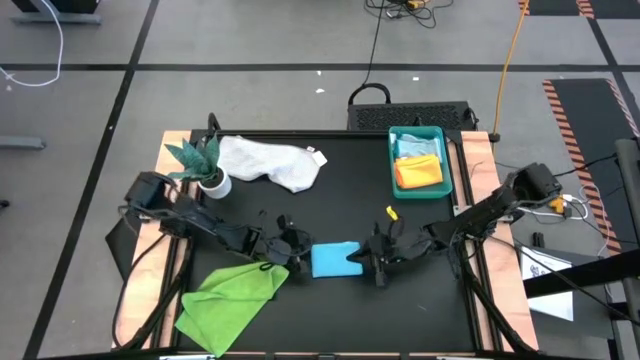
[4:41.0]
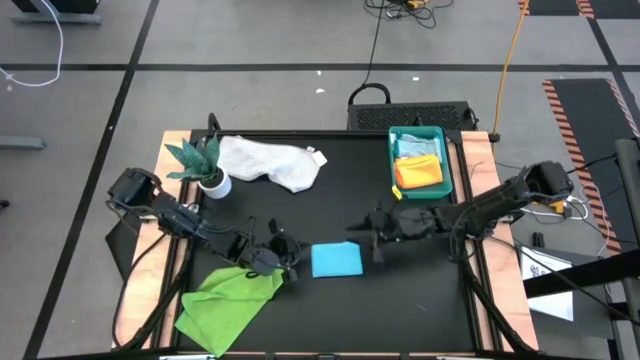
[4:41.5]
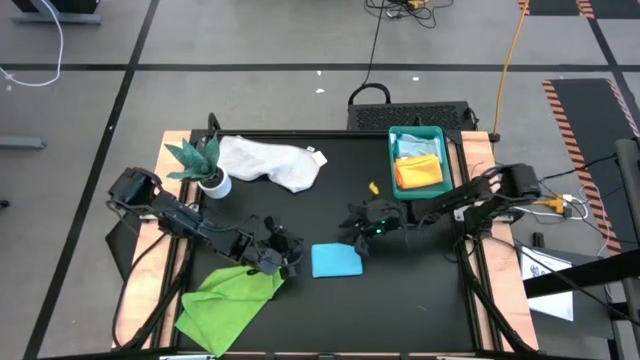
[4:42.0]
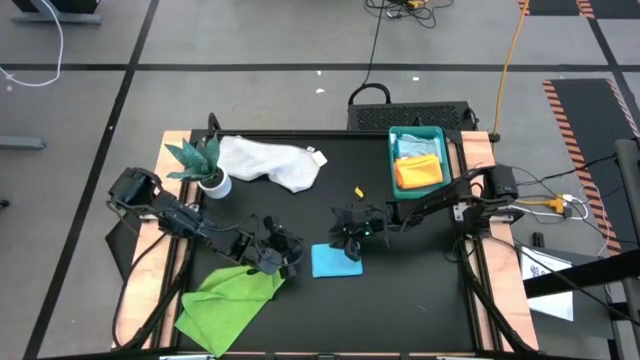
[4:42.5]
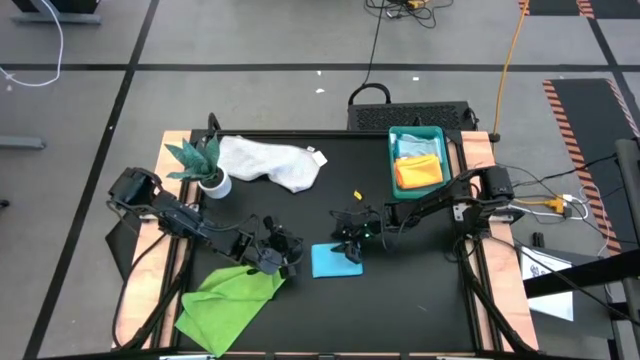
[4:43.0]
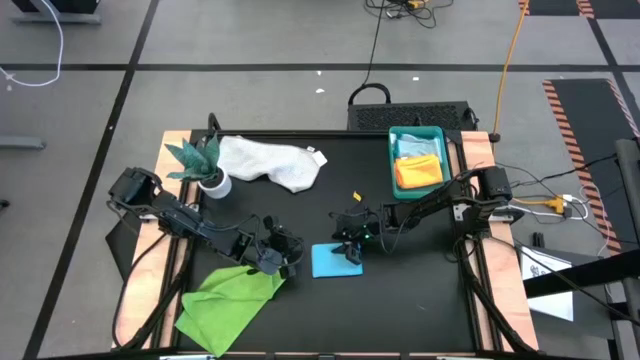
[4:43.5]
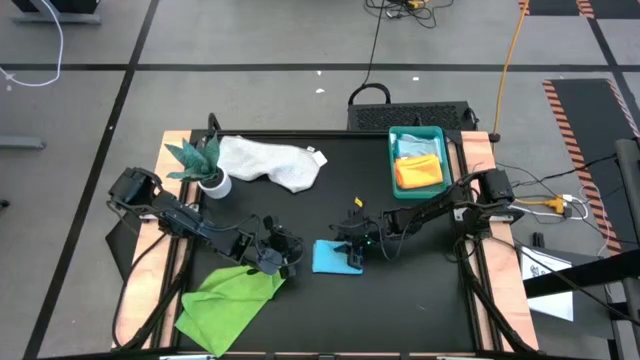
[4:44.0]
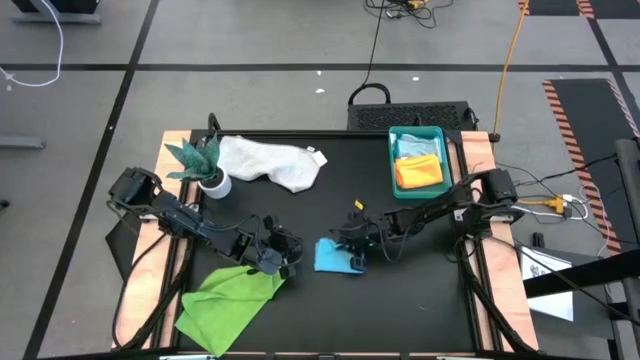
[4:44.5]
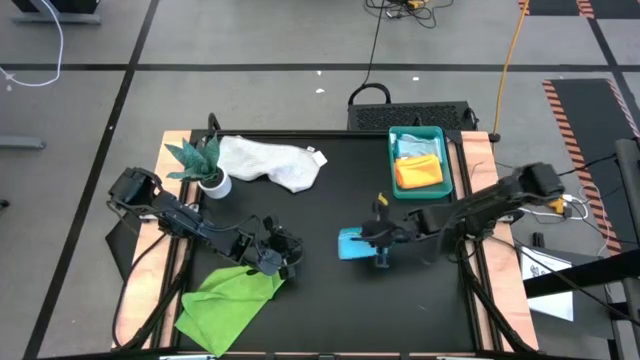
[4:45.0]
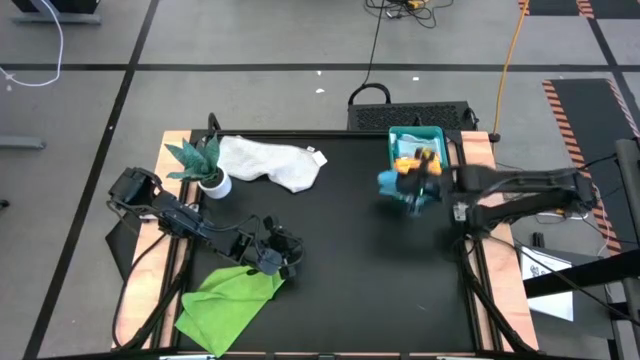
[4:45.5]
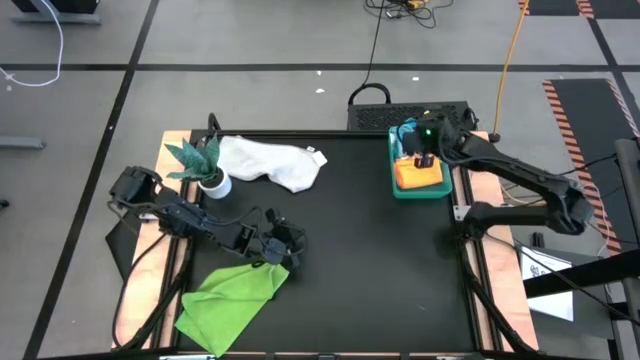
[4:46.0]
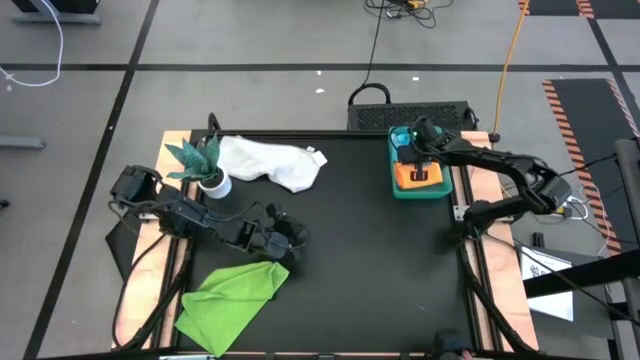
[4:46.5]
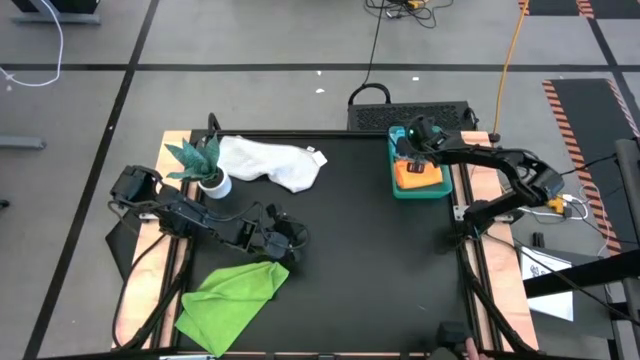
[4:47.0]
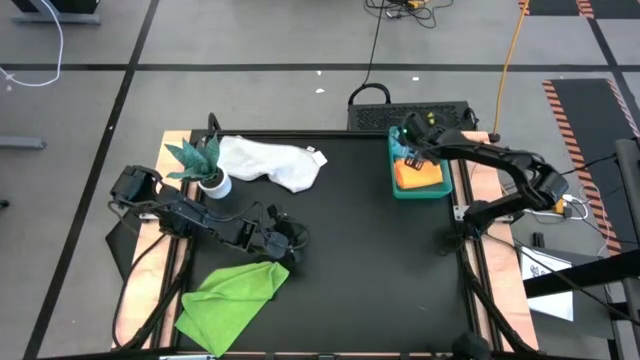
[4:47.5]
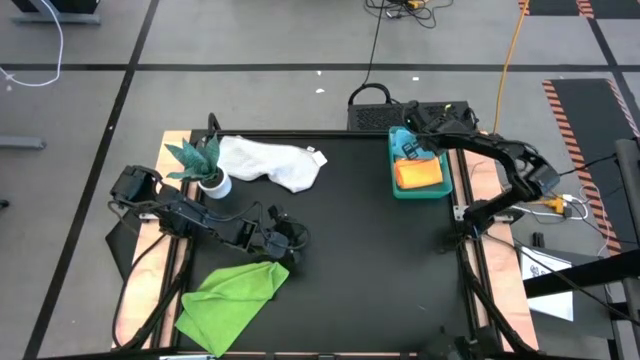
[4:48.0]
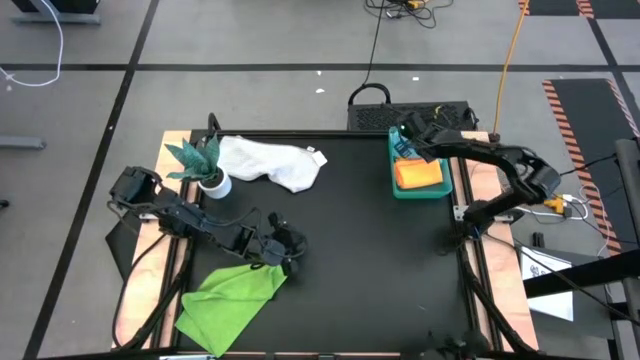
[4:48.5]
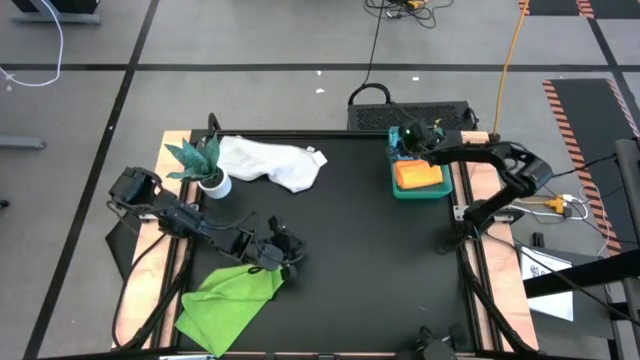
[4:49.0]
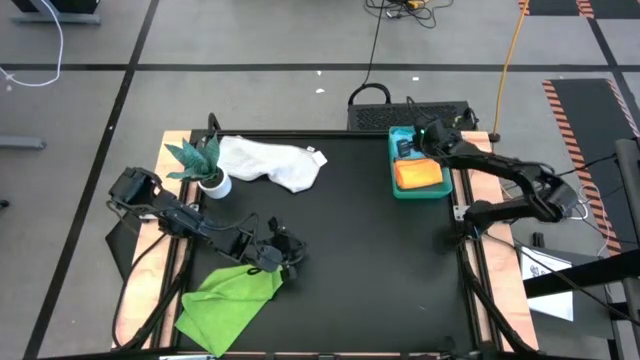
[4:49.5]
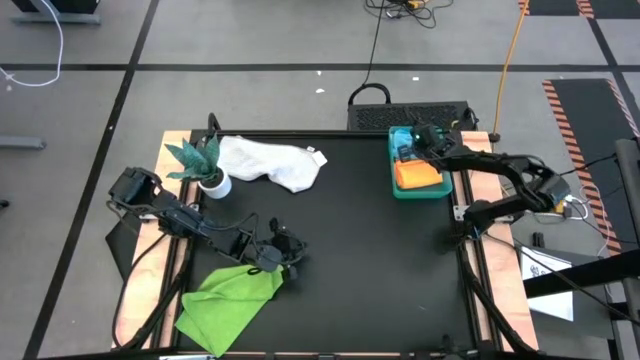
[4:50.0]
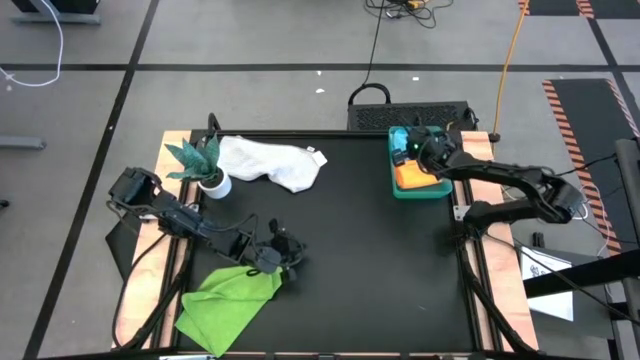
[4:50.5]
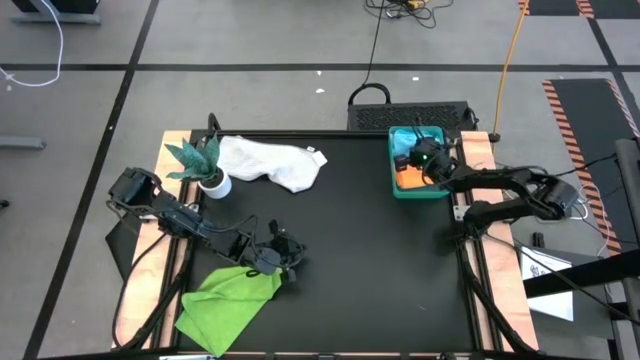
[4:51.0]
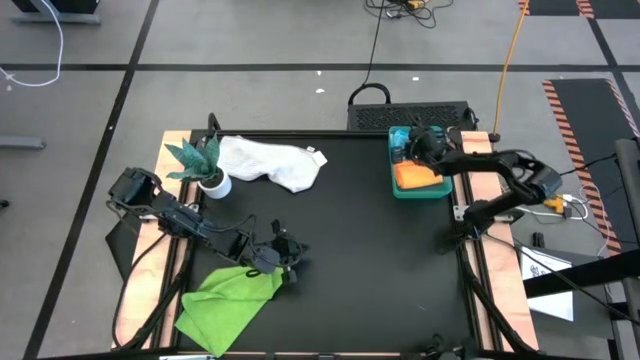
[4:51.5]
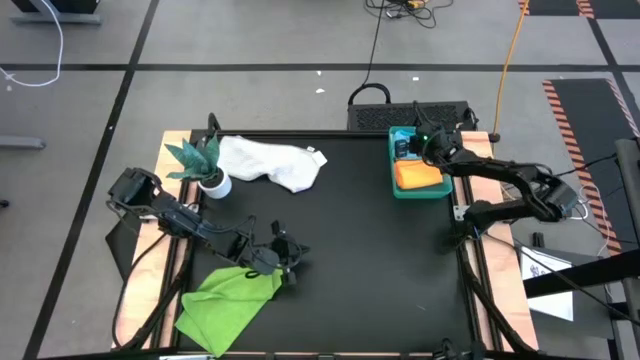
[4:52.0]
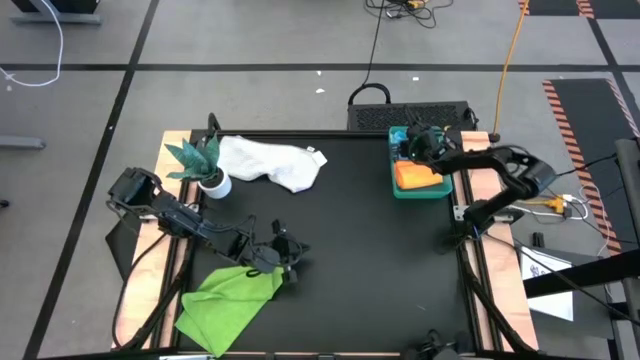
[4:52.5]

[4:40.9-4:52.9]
Task: Fold microfiber towels
Stack the blue microfiber cloth on top of the light blue microfiber cloth in the green bin

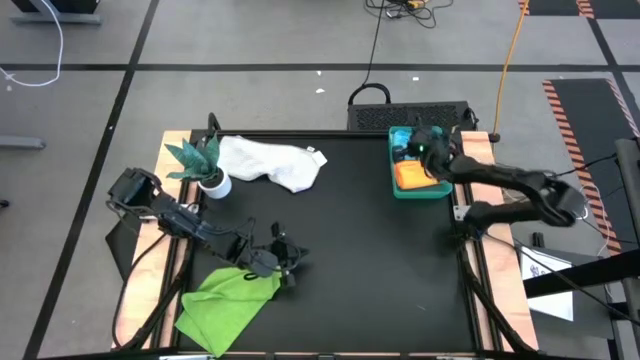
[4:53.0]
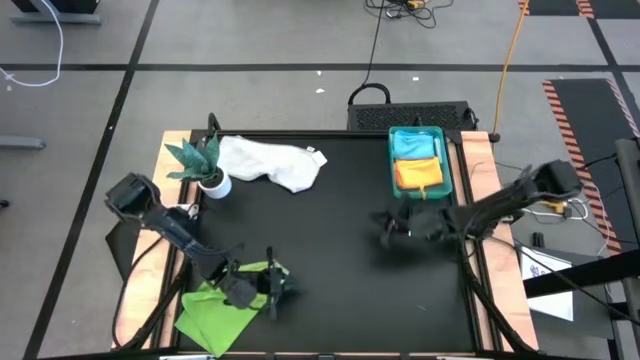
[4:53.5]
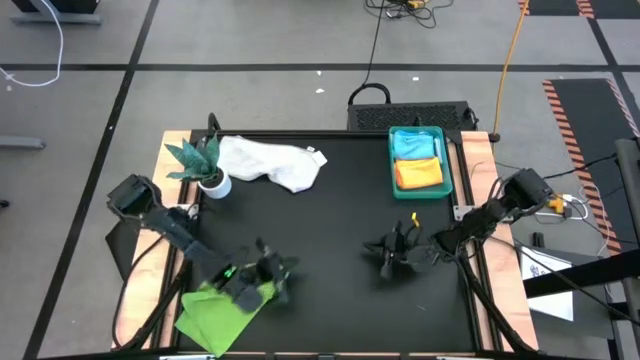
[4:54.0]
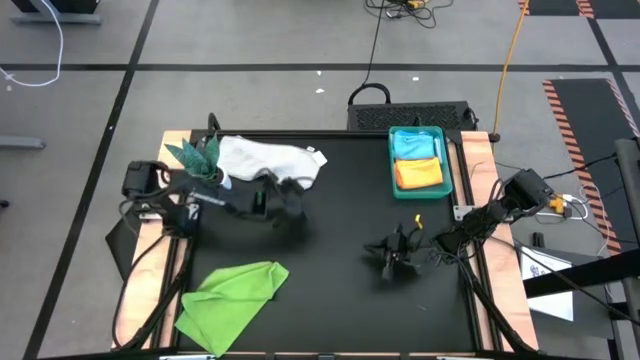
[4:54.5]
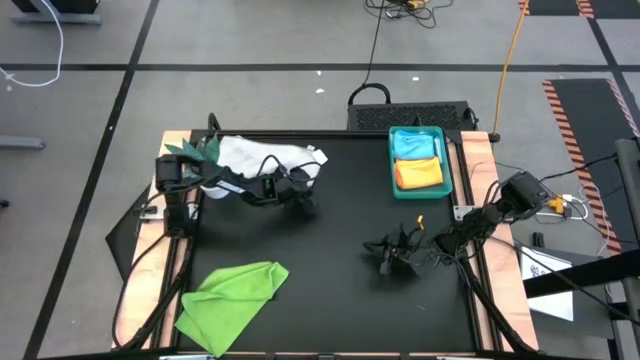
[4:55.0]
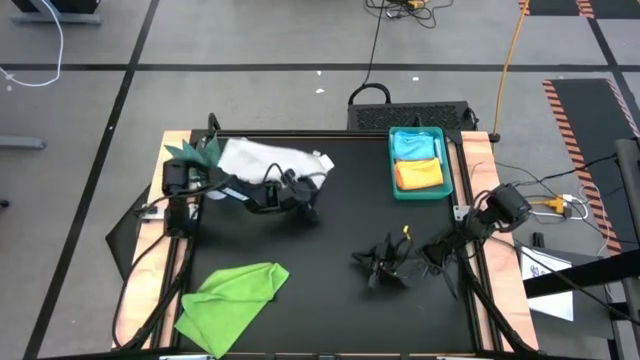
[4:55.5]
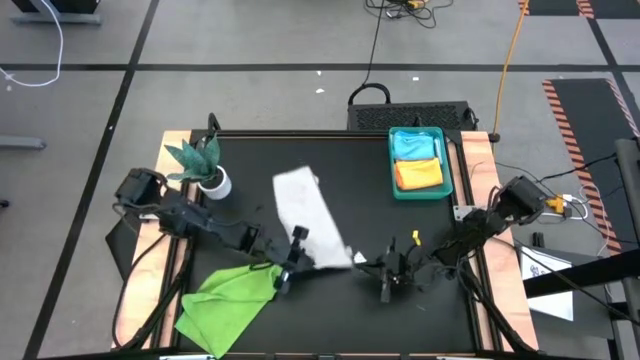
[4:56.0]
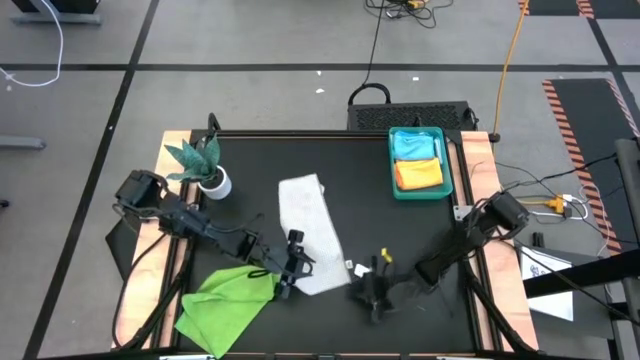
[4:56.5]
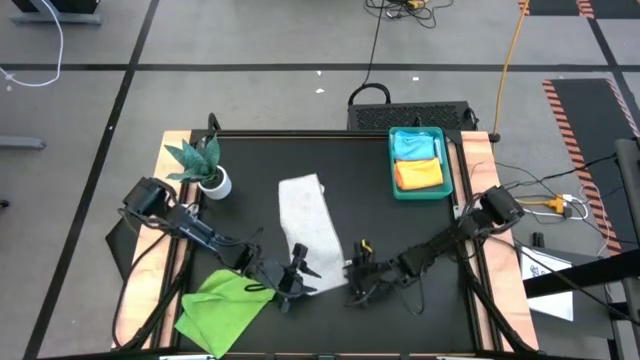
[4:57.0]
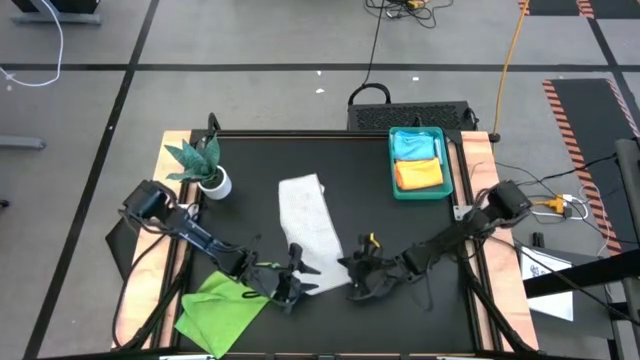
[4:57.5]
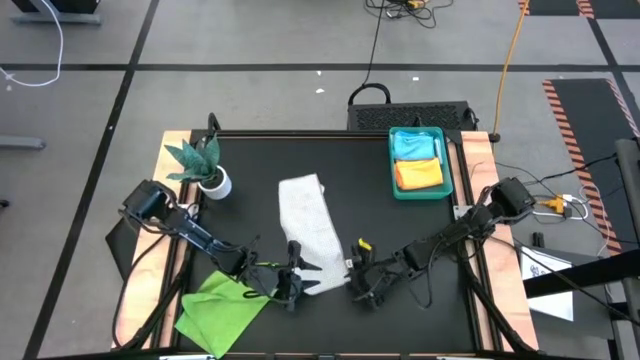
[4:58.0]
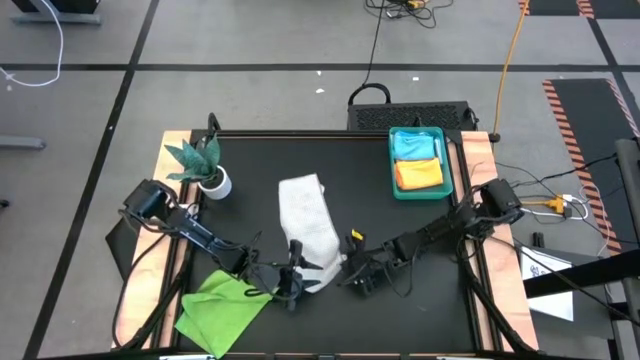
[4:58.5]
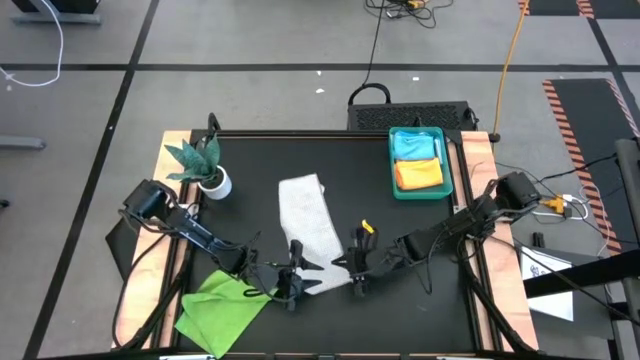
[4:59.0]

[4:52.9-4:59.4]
Fold the gray microfiber cloth

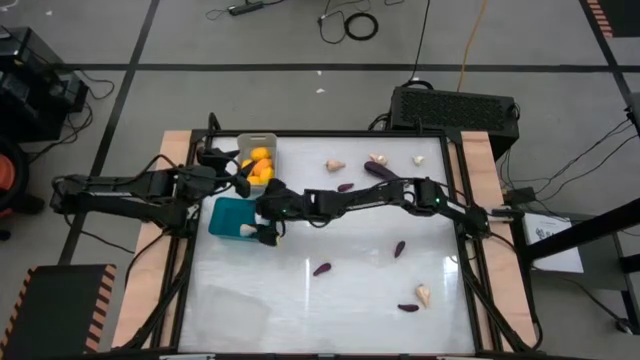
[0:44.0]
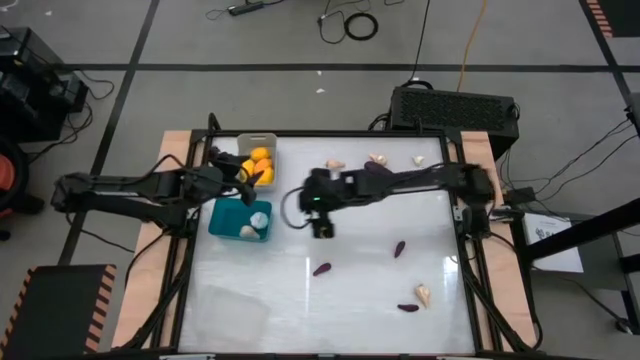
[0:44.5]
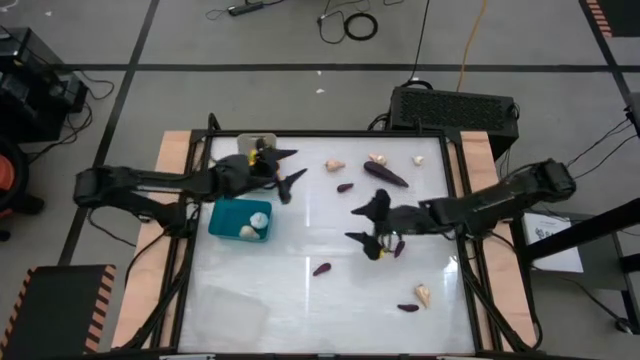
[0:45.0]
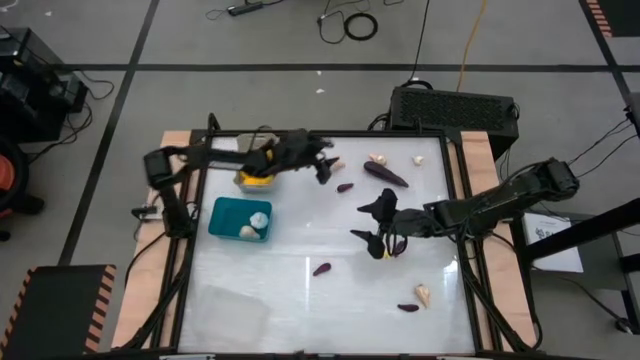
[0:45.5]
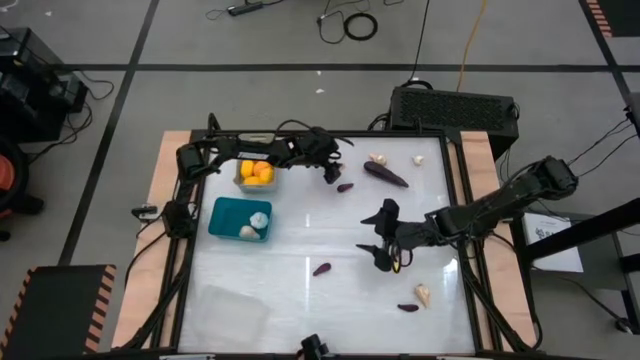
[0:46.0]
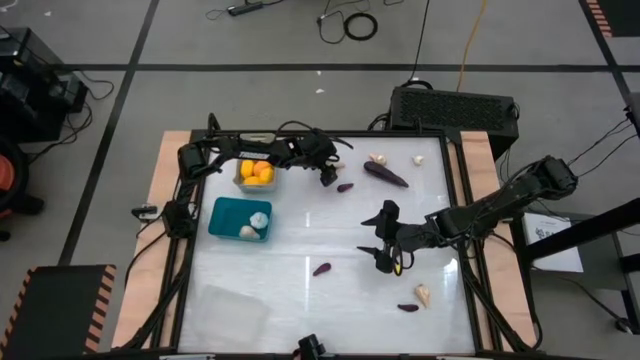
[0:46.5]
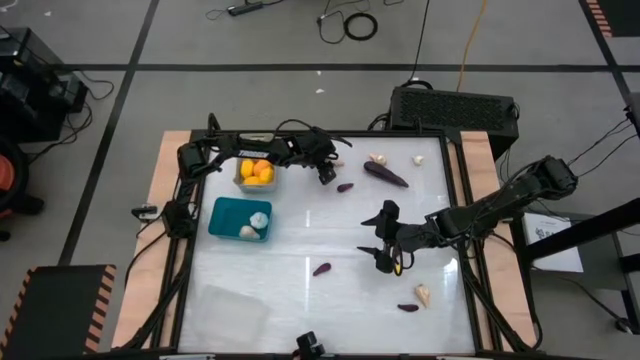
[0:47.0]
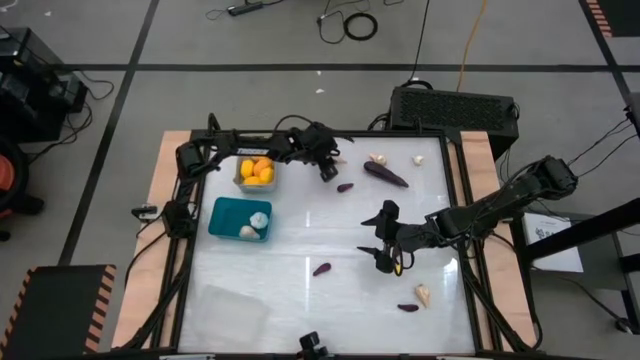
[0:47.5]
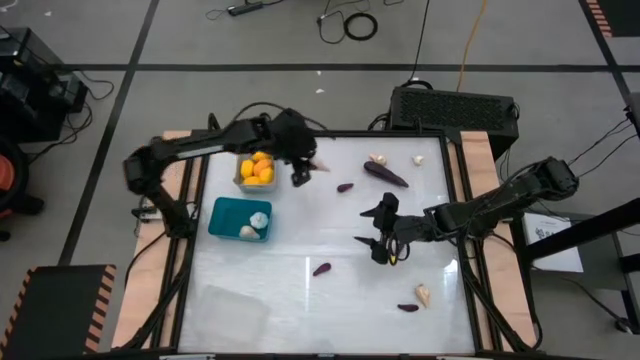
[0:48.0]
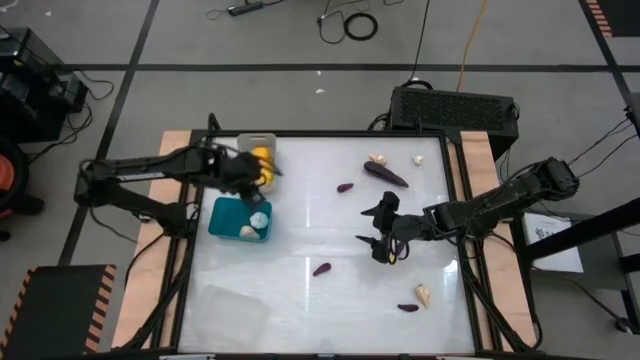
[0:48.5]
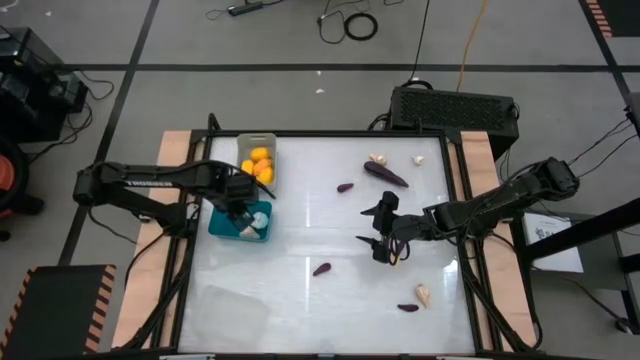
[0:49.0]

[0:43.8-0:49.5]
Task: Sort produce into baskets
Put the white garlic into the blue bin
